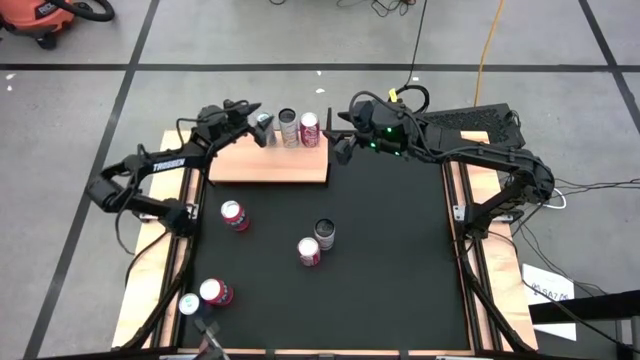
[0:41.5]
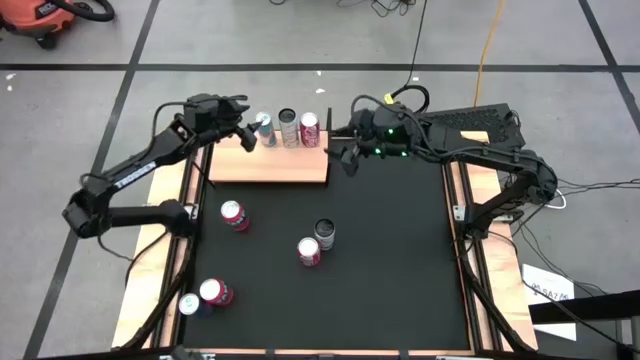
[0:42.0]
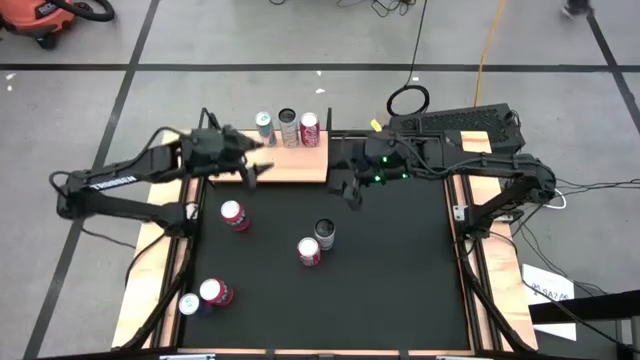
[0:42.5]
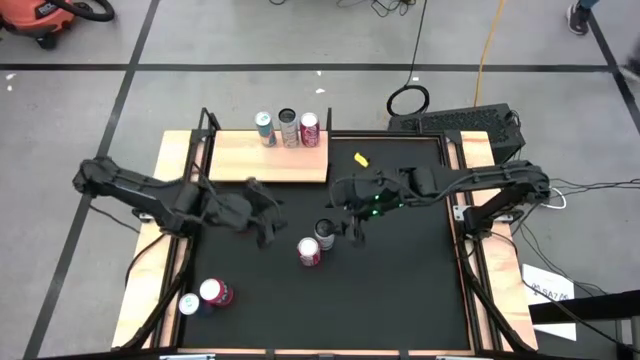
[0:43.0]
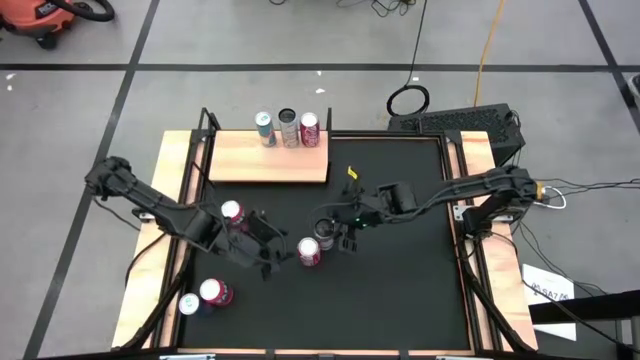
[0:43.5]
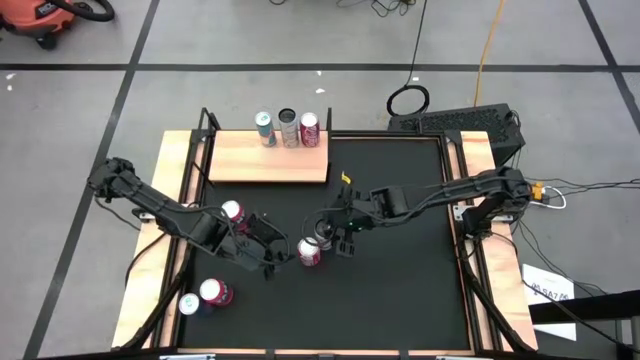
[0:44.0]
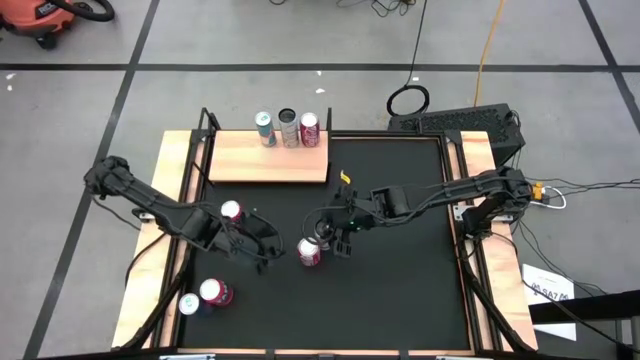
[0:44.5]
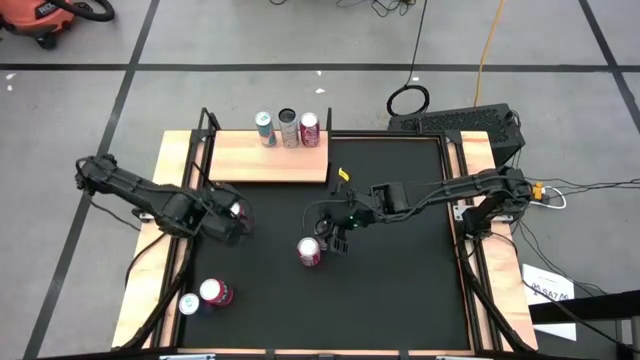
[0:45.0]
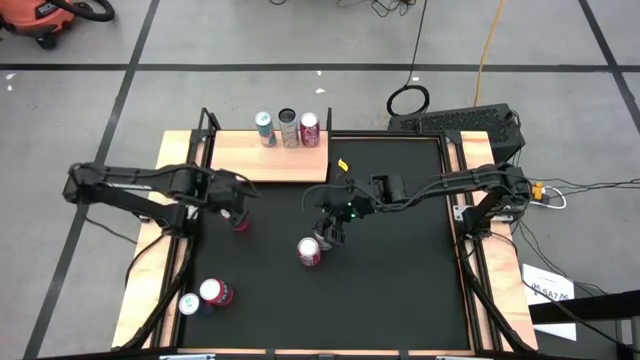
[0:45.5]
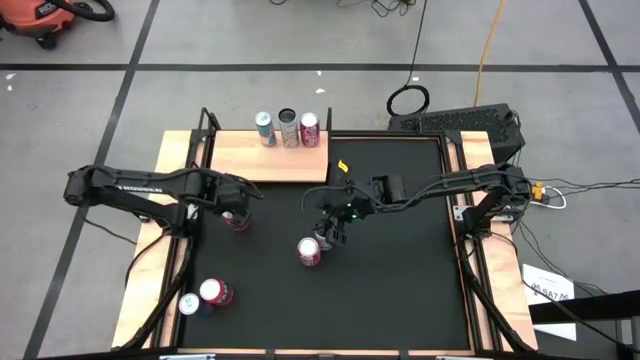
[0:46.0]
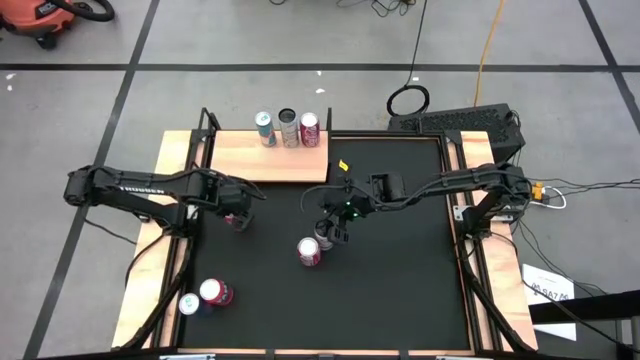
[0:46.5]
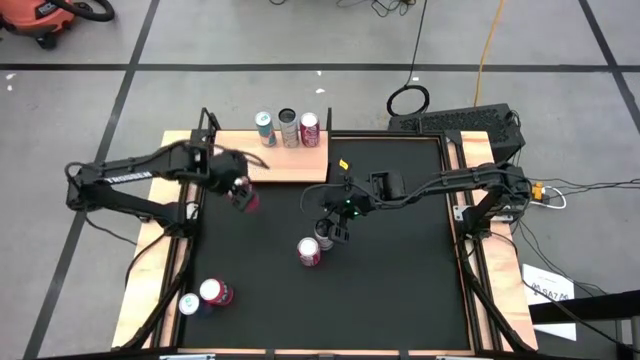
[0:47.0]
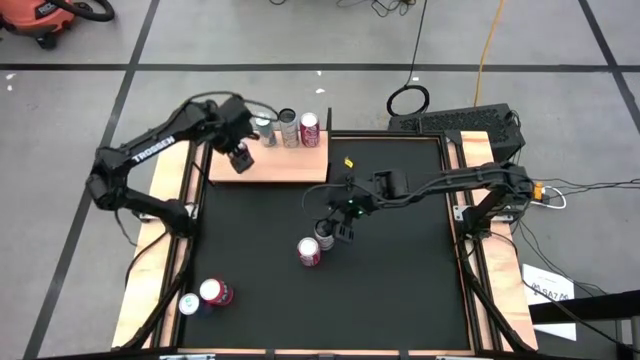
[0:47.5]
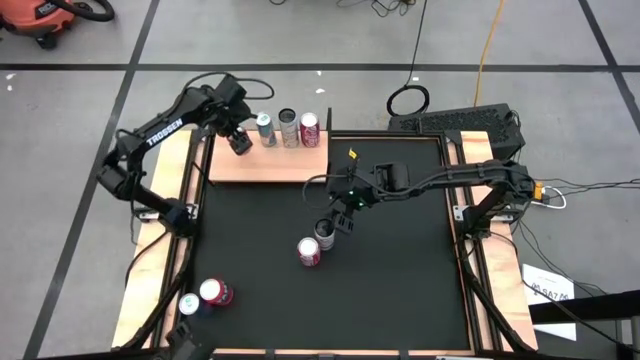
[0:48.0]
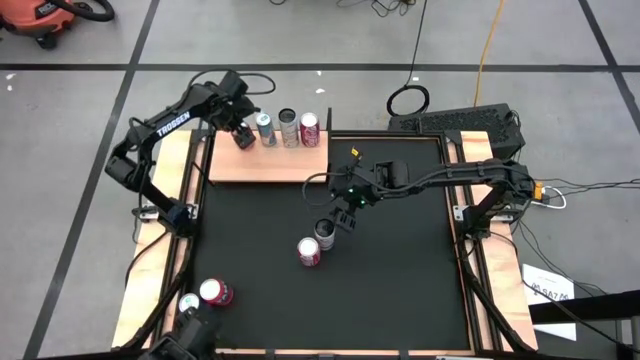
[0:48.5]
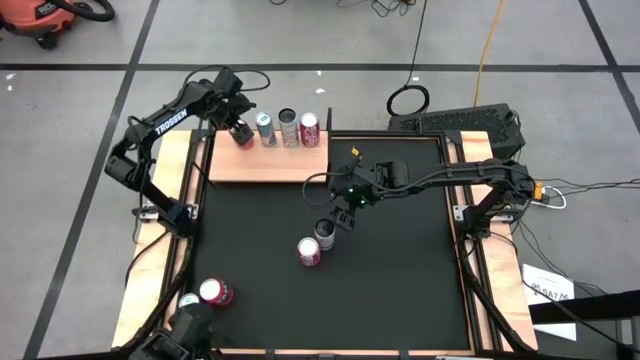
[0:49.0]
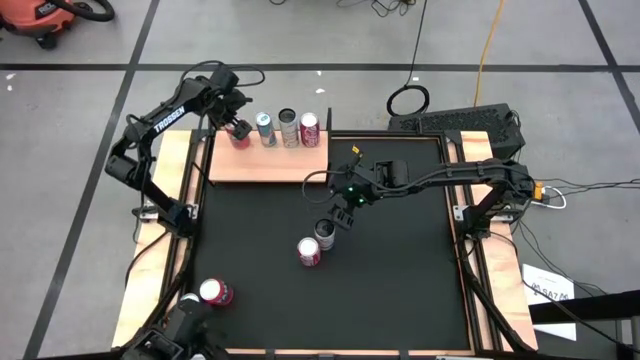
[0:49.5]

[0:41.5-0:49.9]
Task: Place canned beverage on shelf
Put the top red soda can on the shelf

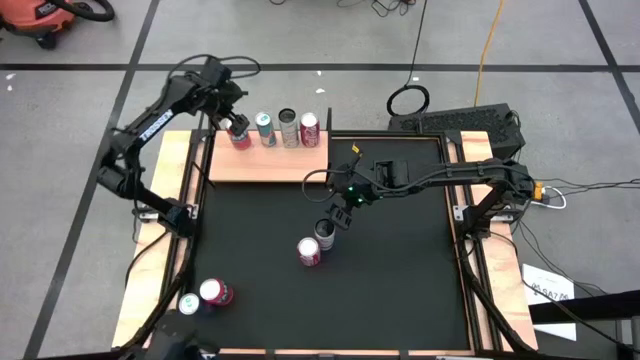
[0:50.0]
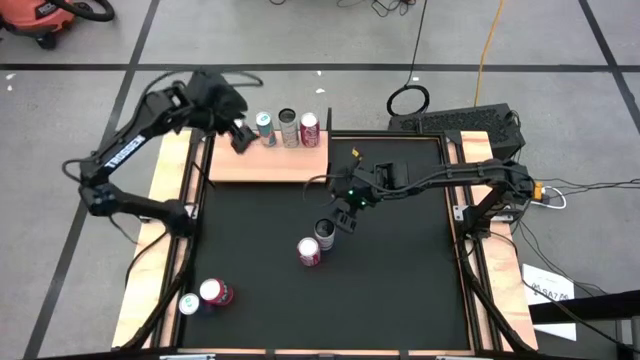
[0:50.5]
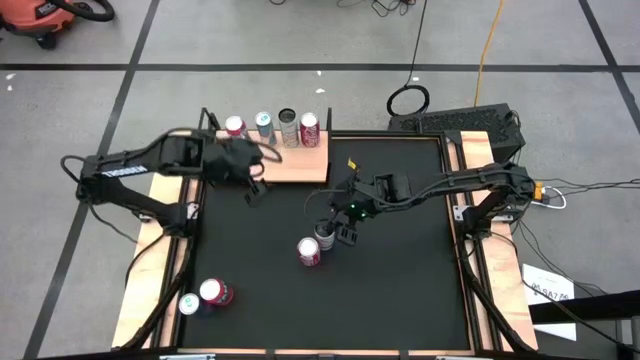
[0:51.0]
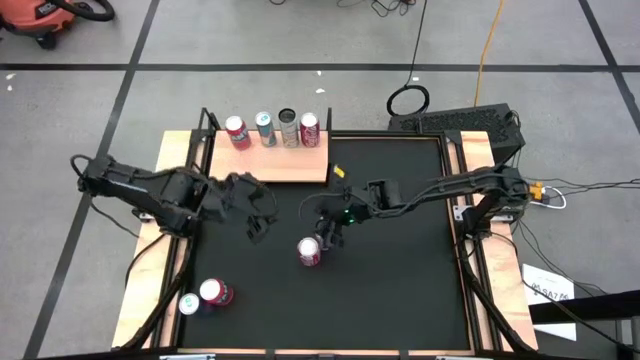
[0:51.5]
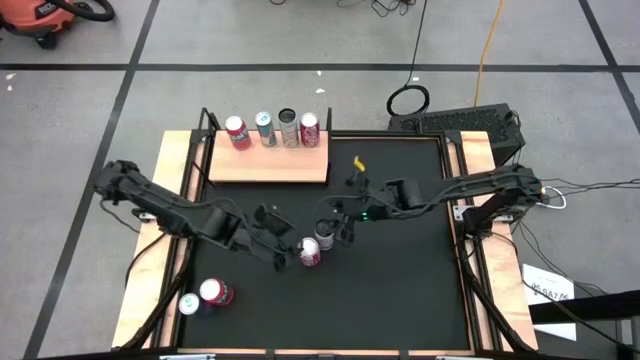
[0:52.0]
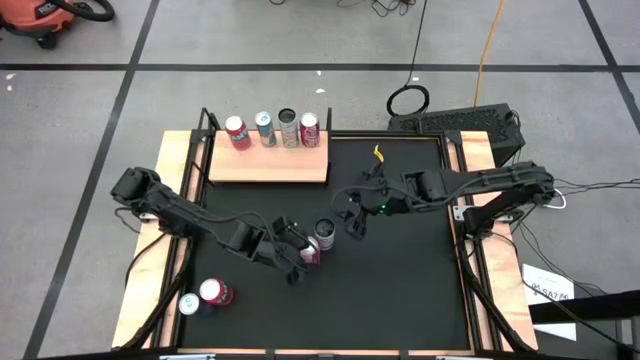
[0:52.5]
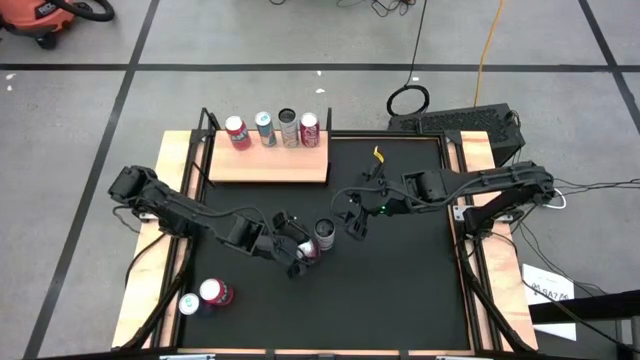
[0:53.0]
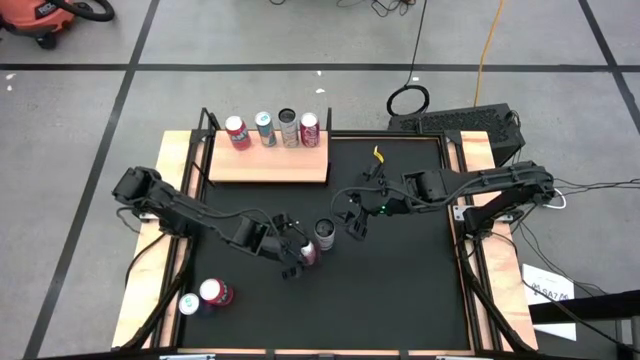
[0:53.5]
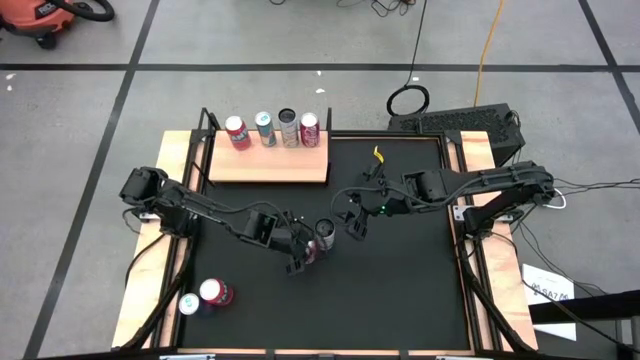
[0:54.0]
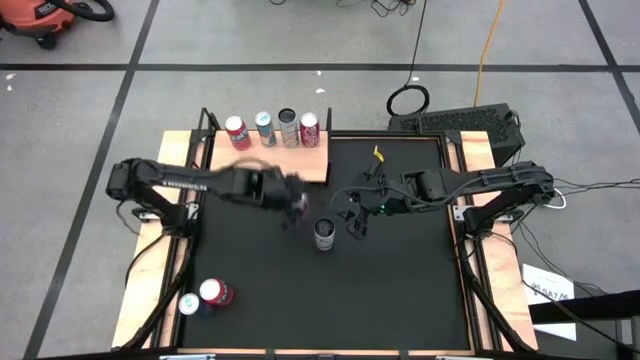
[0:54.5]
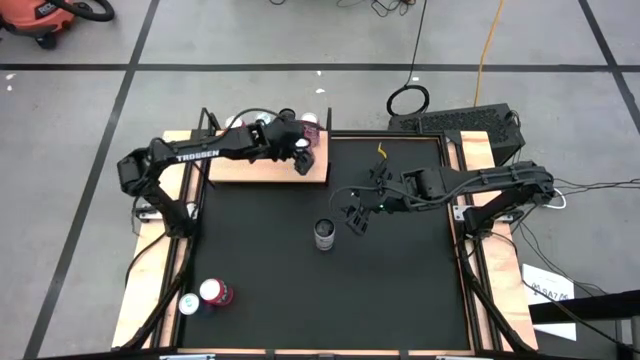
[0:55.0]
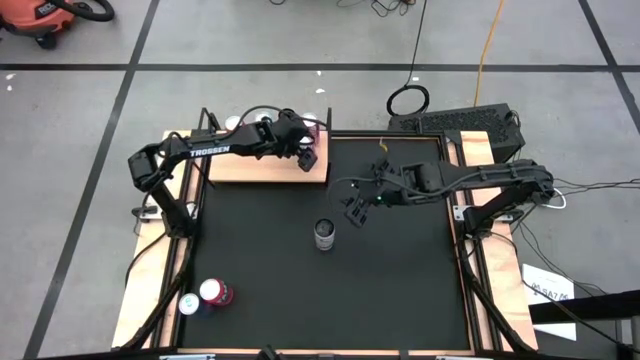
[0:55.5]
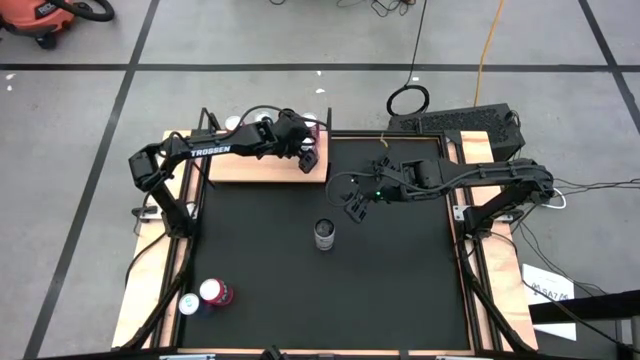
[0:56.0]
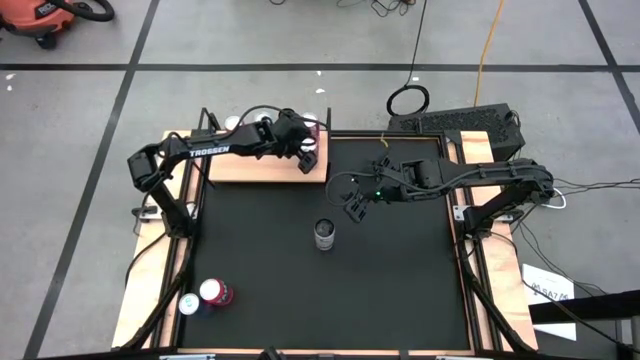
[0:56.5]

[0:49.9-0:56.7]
Put the red white soda can on the shelf aligned with the other red white soda can

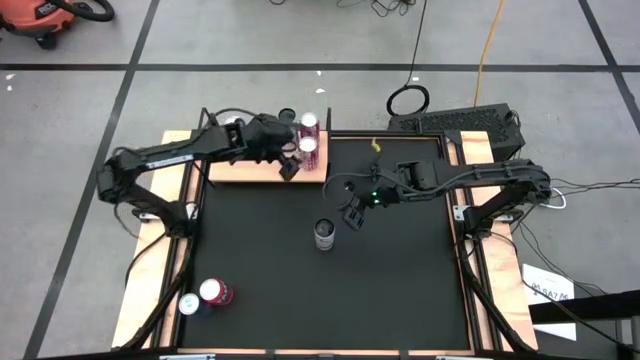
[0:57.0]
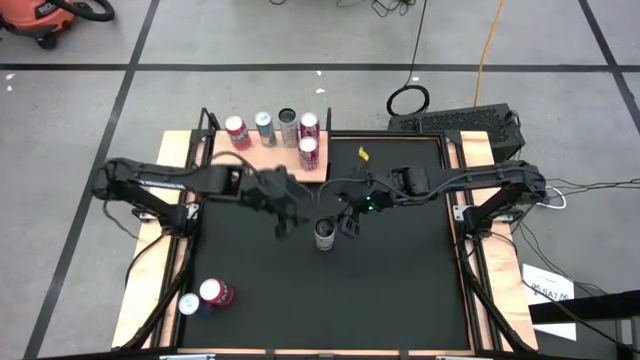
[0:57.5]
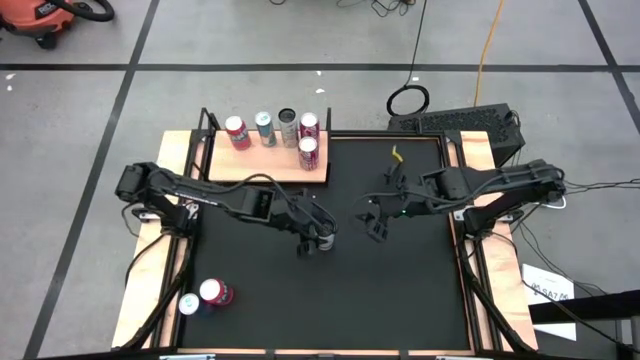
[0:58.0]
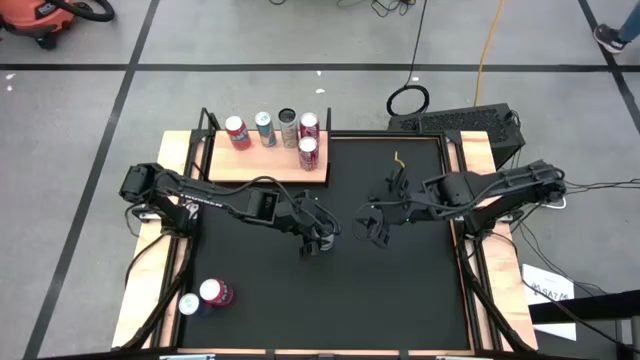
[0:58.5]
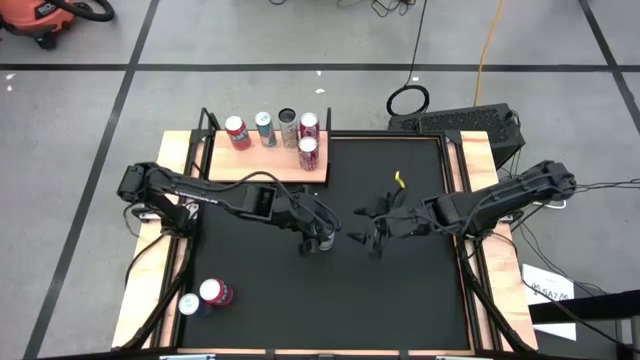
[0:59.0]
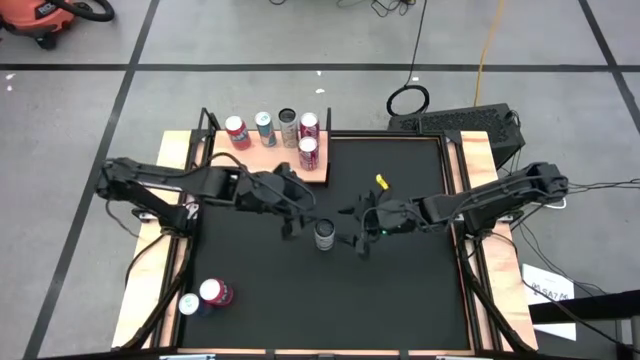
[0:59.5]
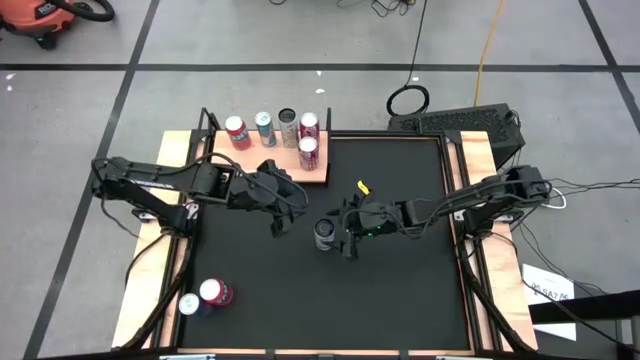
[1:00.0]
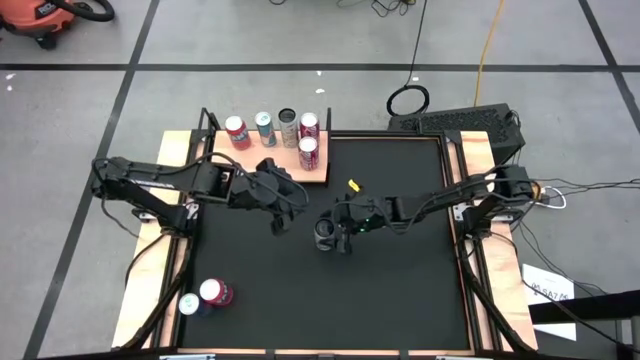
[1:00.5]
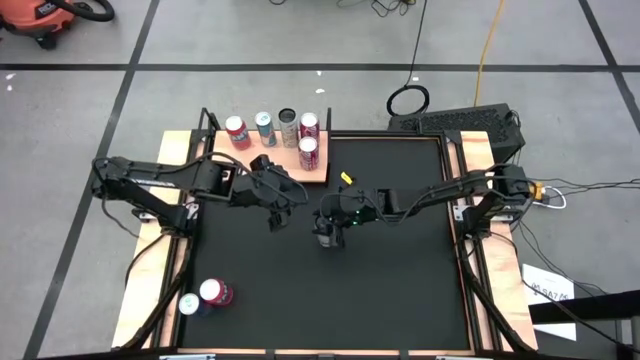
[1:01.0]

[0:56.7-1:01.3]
Put the white yellow soda can on the shelf aligned with the other white yellow soda can

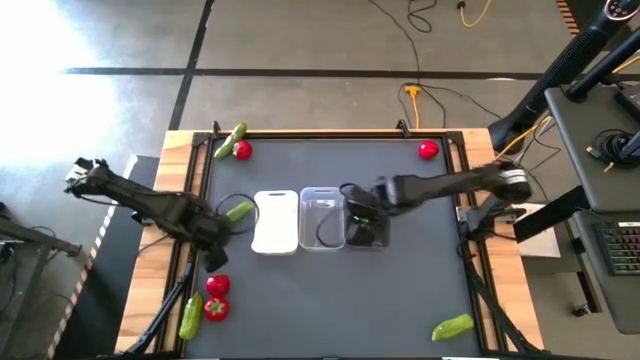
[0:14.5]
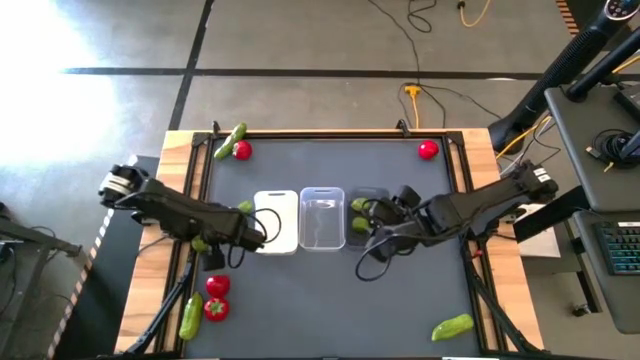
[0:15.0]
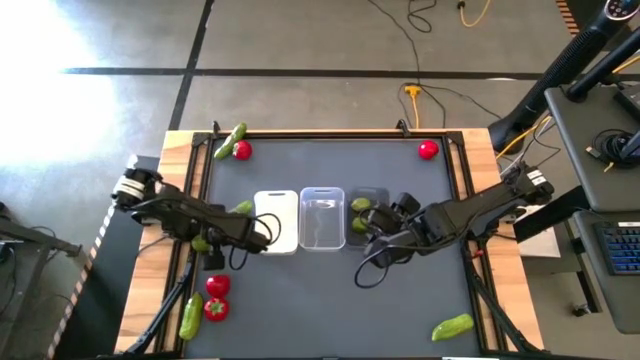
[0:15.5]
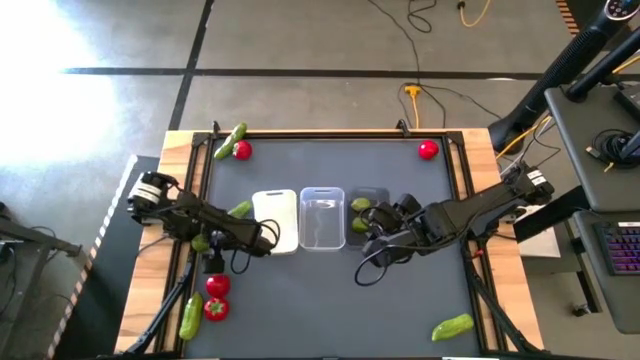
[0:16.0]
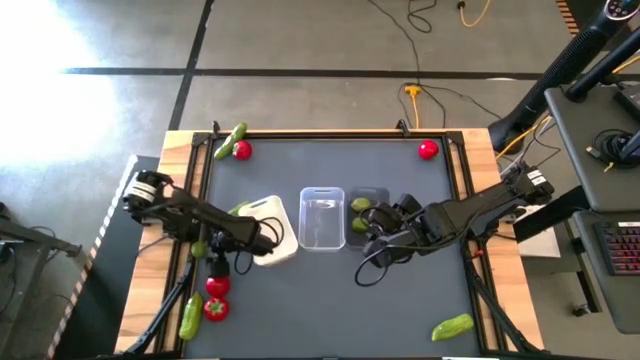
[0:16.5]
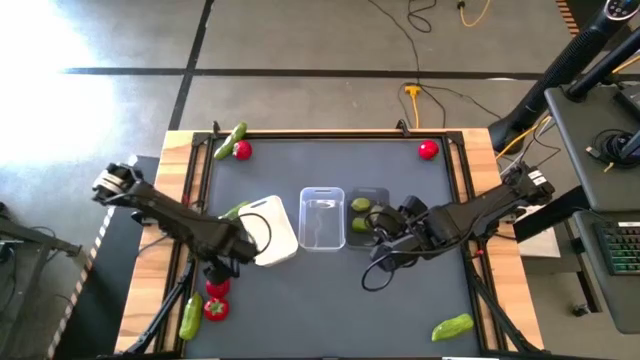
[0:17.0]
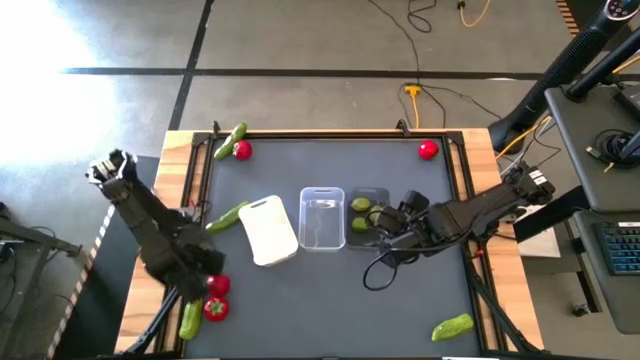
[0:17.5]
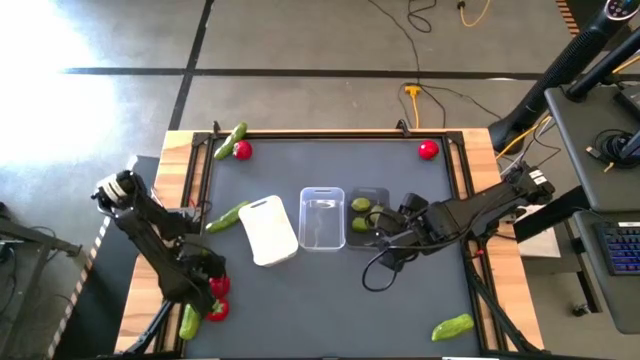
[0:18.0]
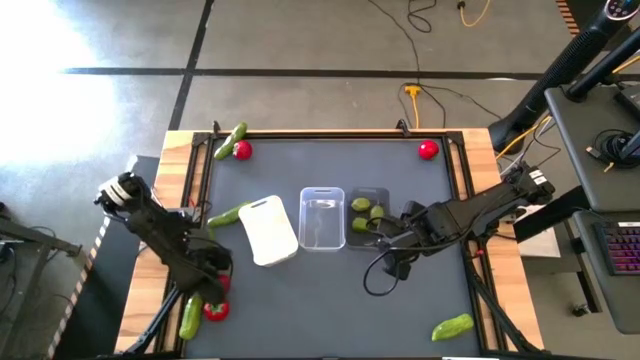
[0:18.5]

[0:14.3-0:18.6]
Task: Sort produce into baskets
Put the green lime into the black bin
